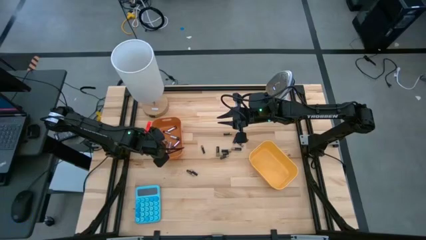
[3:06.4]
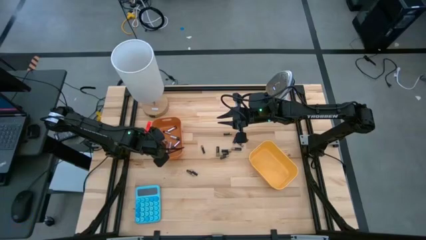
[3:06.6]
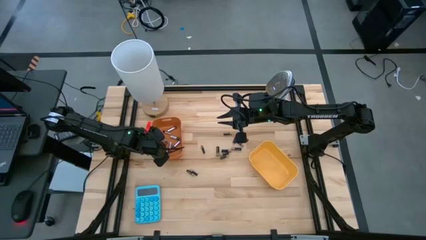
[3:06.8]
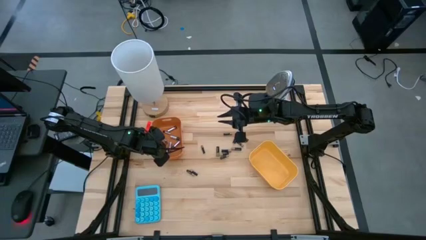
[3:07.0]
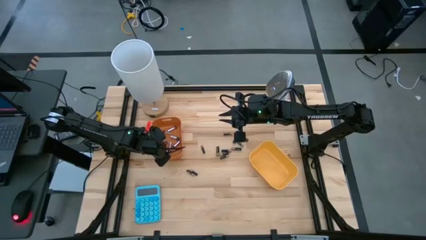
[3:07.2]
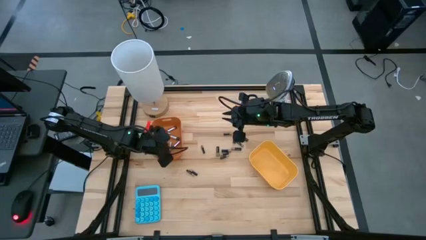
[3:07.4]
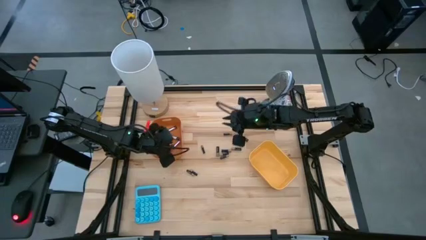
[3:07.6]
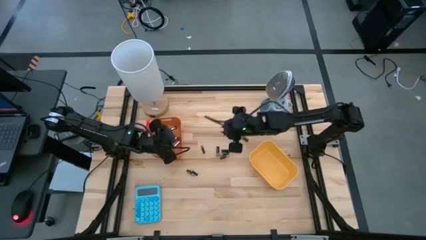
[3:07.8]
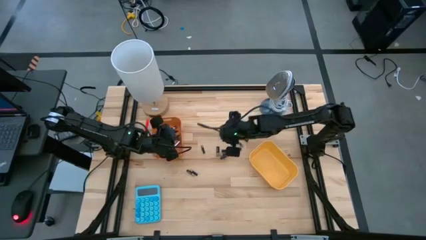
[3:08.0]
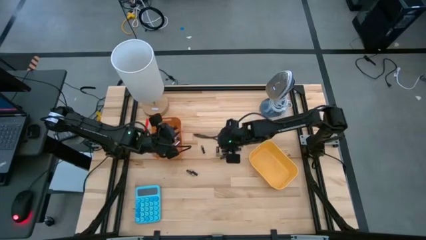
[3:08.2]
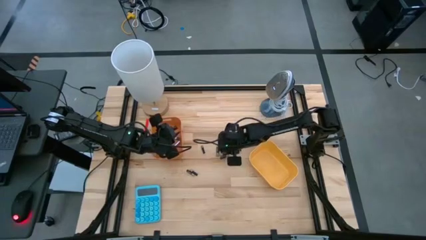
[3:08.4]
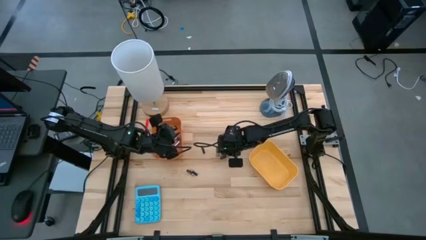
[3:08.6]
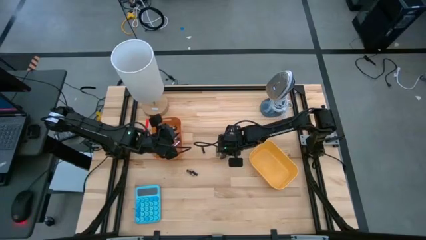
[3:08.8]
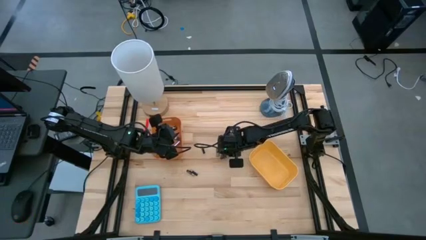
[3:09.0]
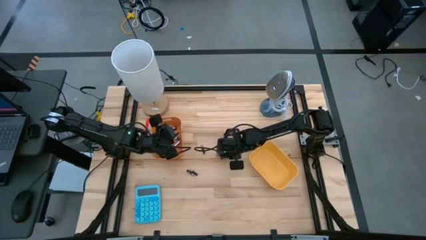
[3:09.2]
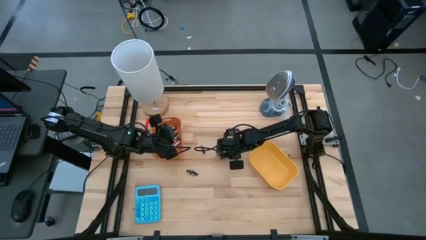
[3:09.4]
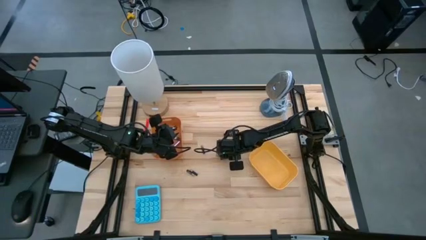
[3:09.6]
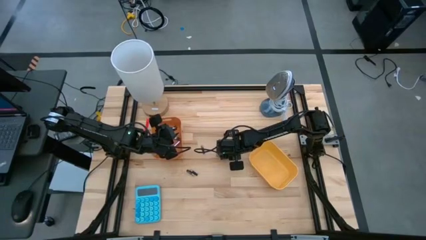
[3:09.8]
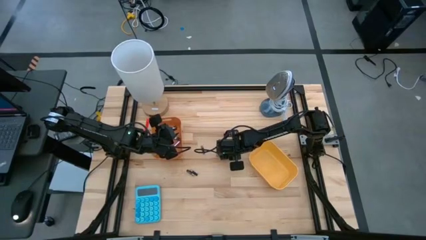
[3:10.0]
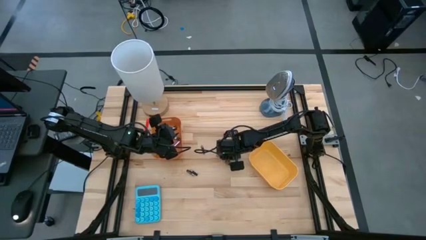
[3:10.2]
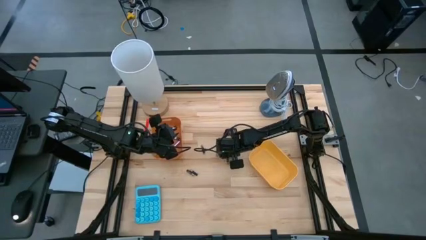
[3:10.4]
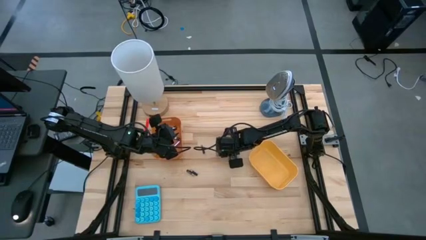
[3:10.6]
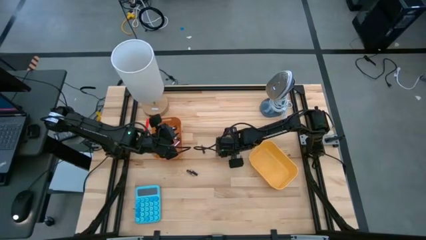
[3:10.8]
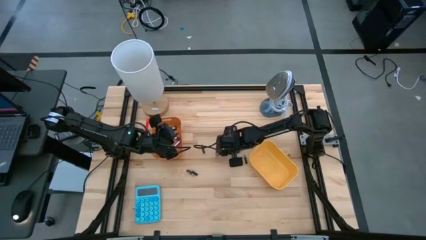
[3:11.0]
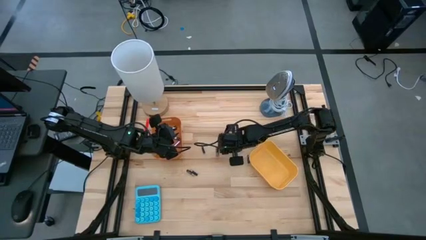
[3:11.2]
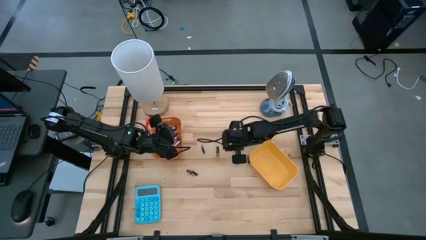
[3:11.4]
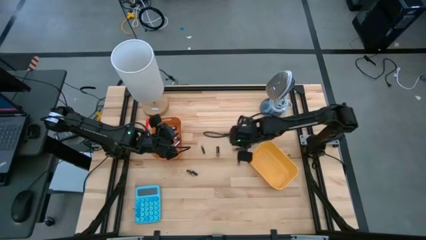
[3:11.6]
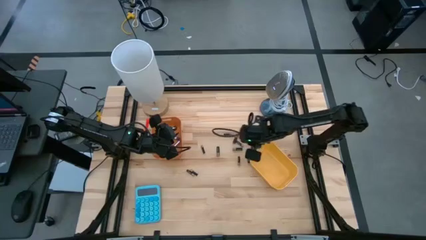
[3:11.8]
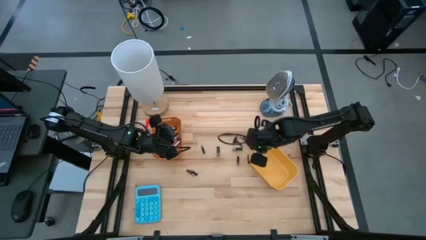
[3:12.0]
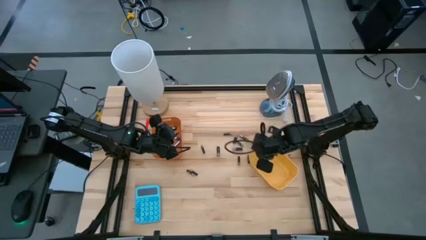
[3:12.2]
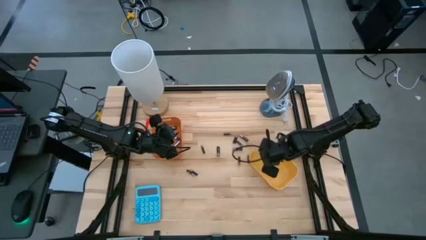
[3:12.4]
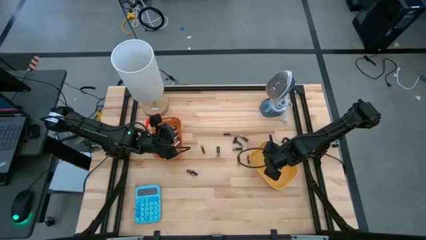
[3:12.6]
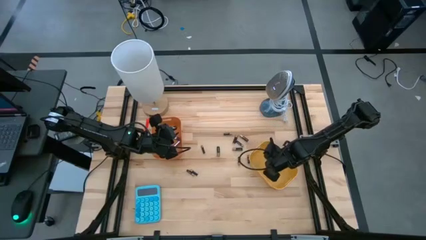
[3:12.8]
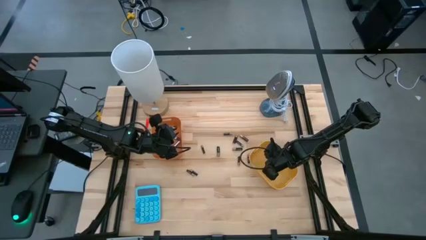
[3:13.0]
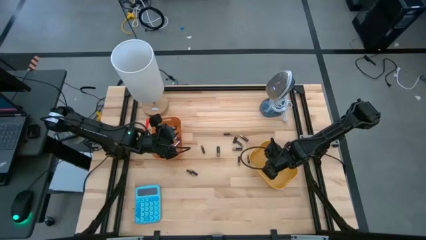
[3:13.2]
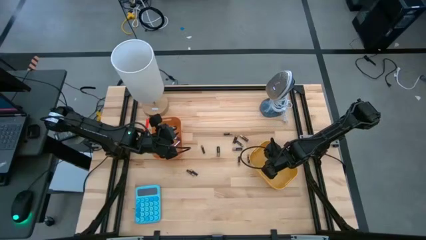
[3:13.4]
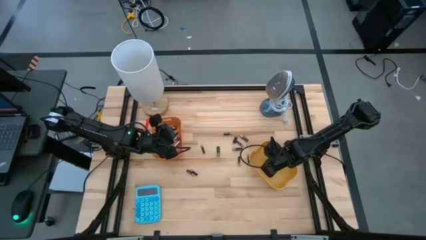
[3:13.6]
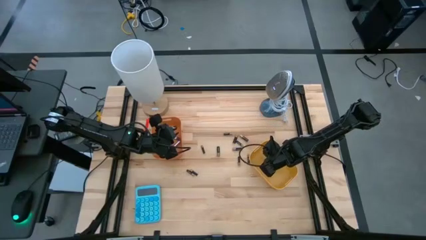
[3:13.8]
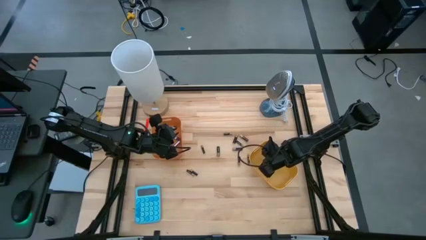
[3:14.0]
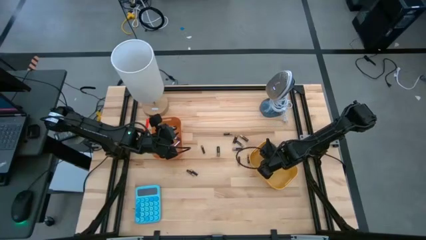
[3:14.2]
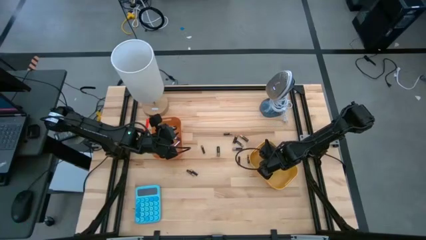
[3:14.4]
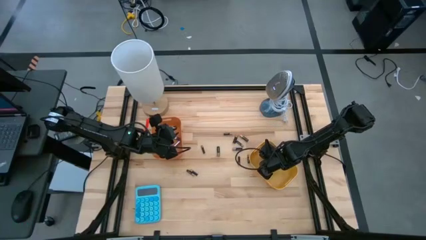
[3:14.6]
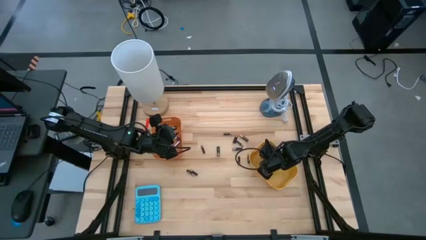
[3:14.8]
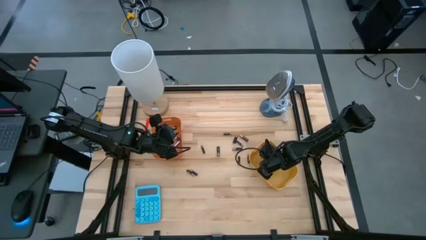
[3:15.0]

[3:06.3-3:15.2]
Task: Sort batteries
Put the gold battery into the yellow bin

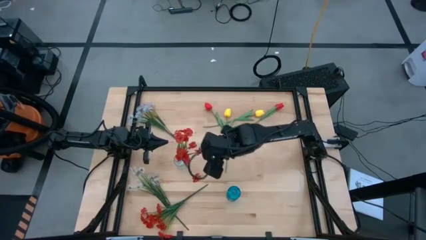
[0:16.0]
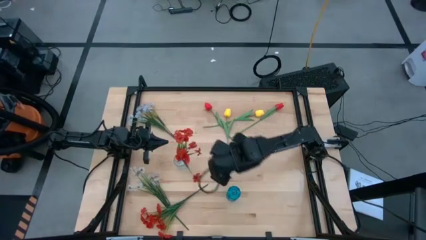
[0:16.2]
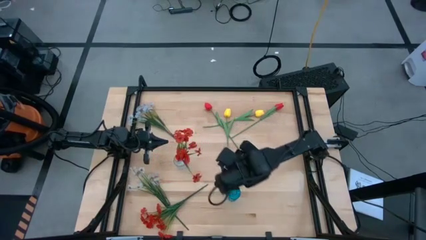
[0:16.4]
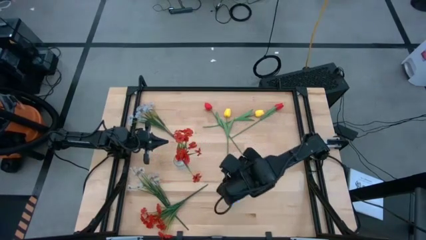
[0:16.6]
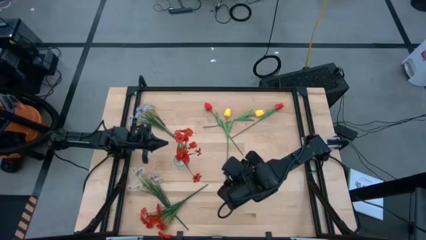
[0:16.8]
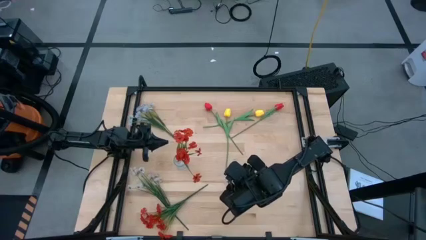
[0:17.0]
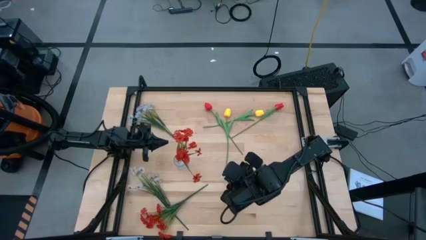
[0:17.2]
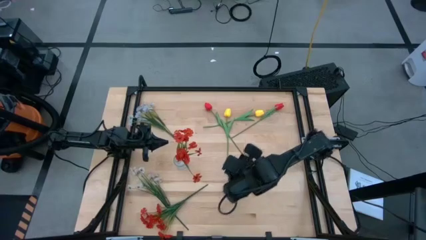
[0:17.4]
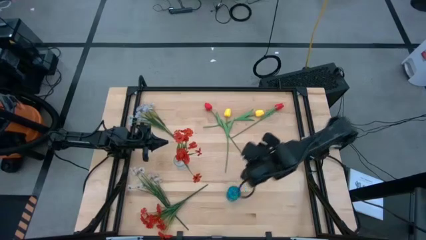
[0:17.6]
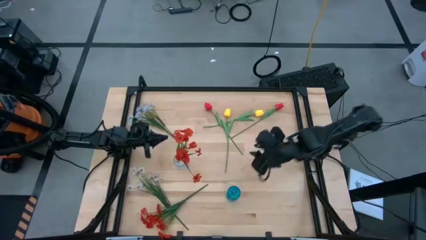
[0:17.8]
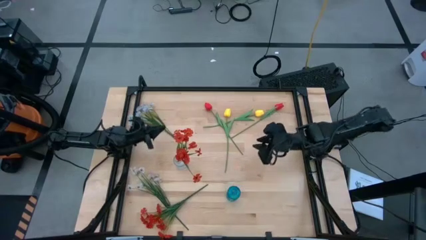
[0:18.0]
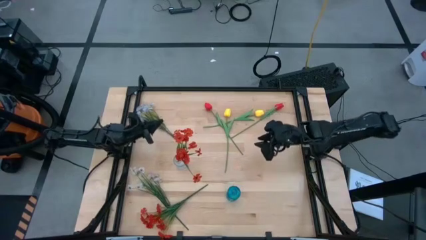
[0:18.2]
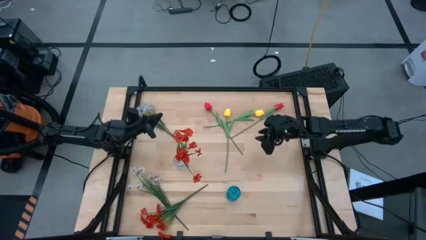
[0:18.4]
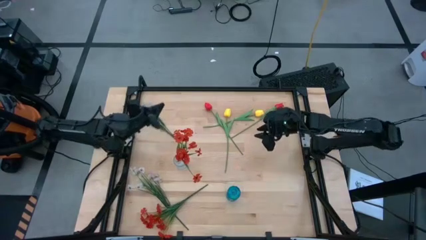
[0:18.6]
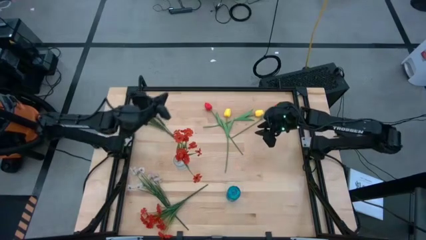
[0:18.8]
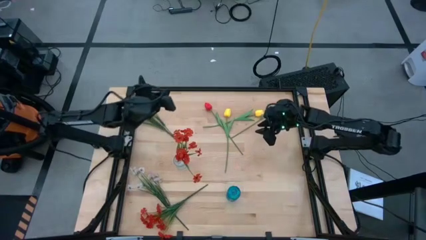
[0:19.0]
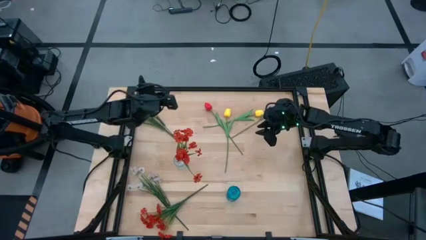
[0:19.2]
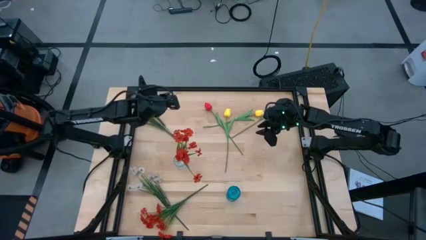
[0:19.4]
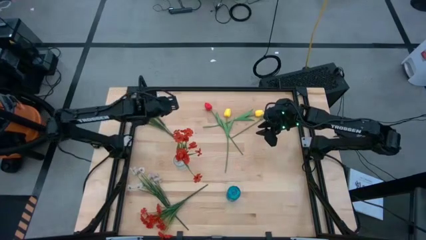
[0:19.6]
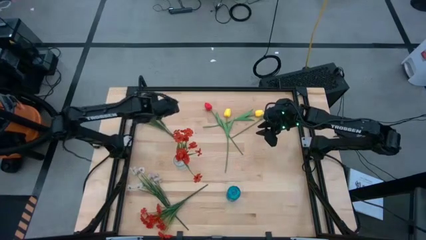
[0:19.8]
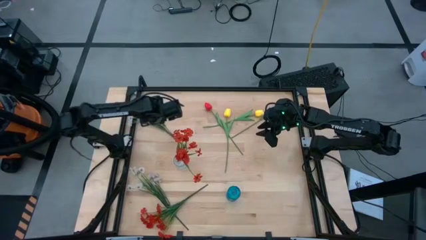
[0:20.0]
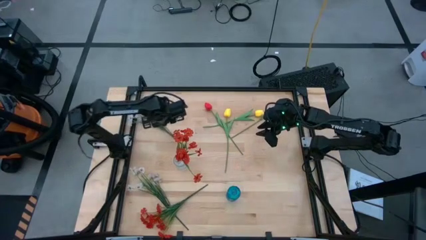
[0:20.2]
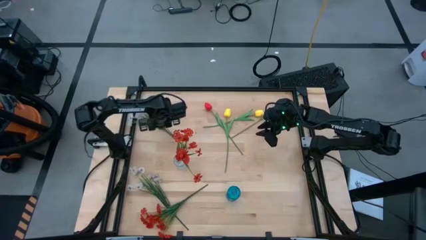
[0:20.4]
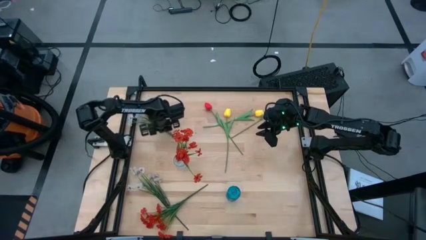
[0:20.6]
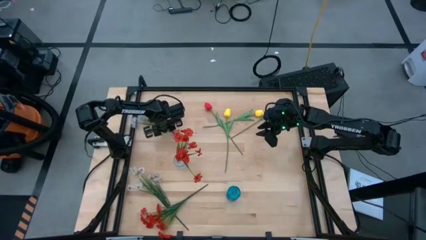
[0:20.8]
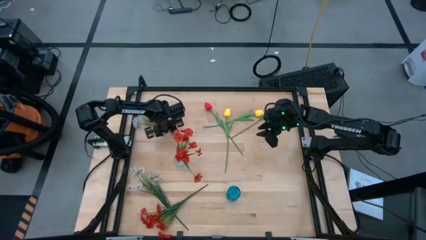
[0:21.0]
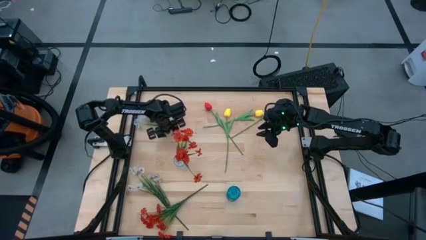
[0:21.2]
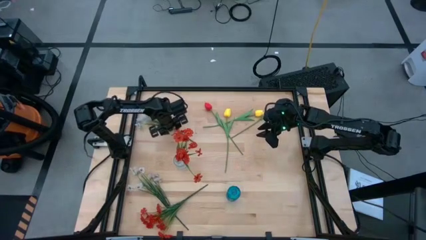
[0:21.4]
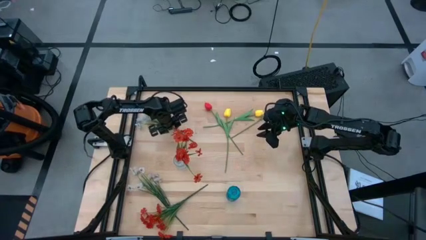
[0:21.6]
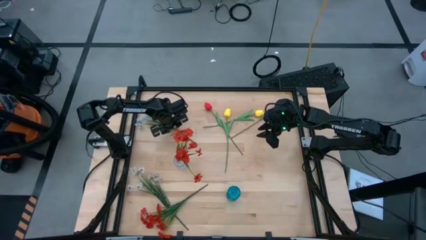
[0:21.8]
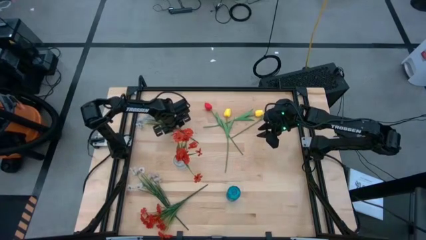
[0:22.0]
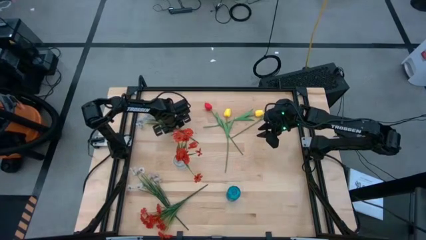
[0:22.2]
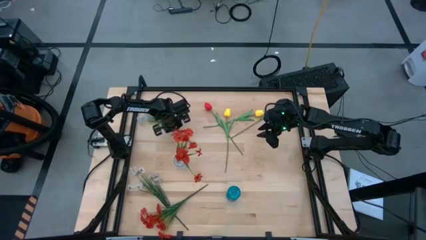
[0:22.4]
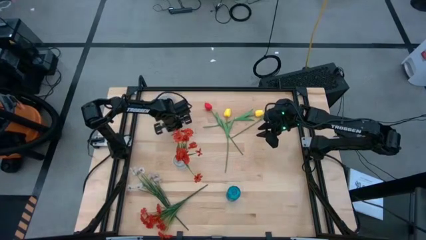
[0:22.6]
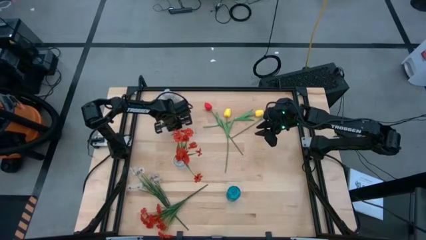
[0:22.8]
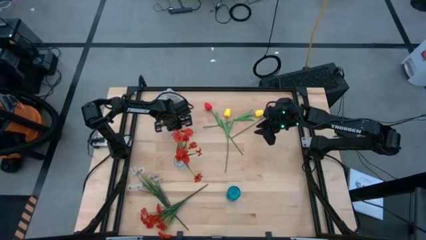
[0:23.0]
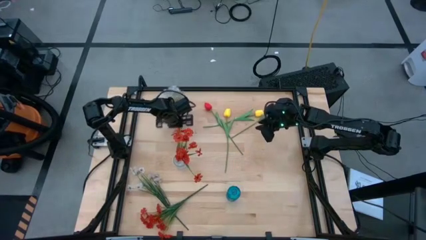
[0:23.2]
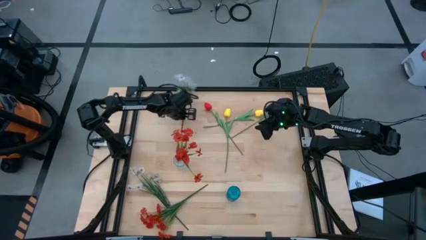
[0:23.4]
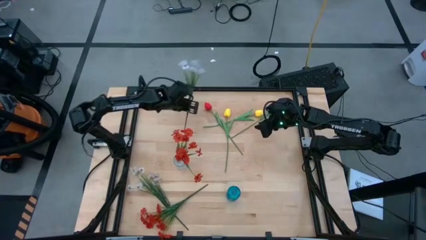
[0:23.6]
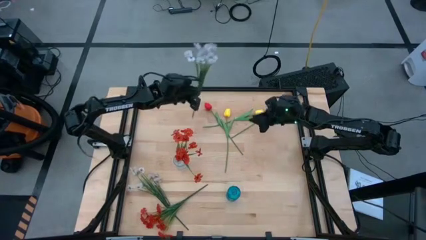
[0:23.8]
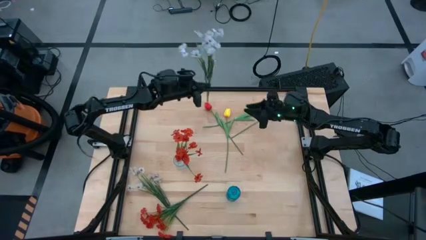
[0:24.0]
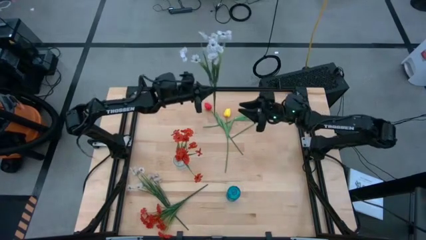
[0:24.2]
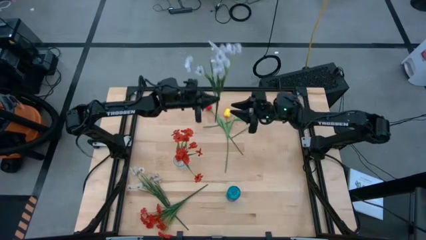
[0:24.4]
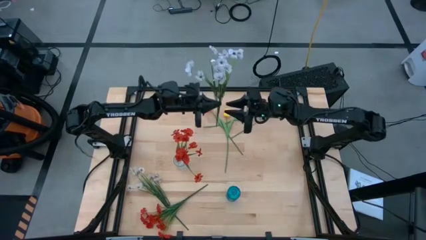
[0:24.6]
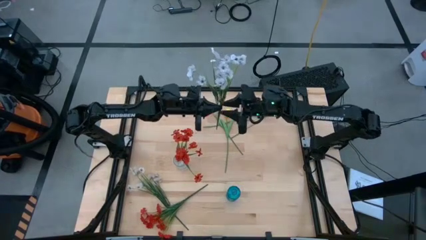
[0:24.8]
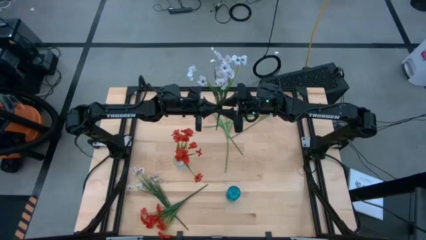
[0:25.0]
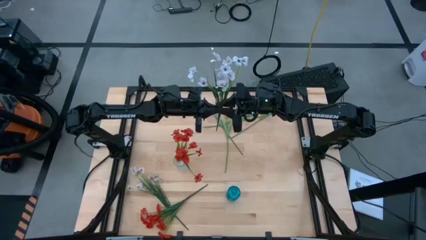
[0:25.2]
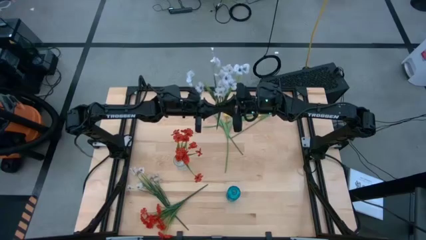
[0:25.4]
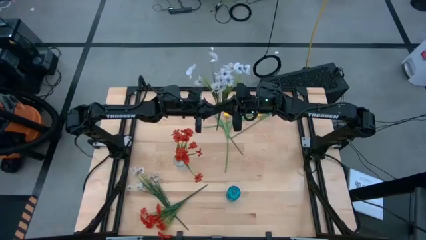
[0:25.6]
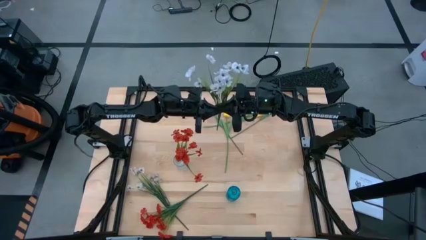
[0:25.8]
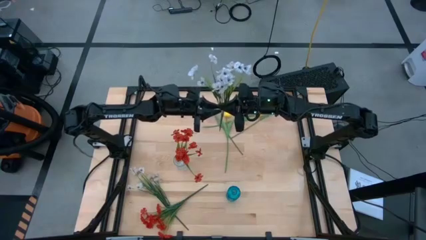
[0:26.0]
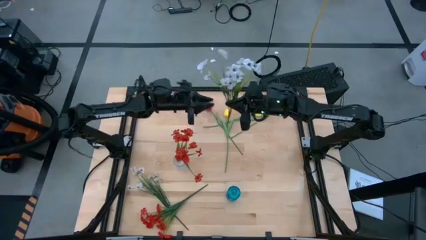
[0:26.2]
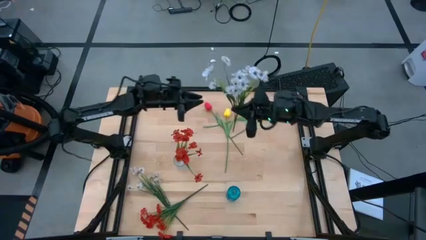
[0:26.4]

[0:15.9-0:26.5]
Task: Sort flowers into vase by color
Put the top white flowers into the blue vase
